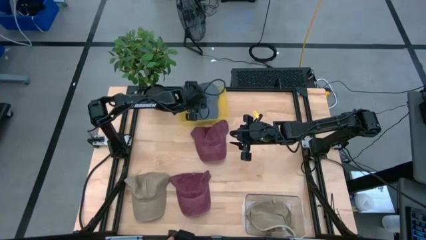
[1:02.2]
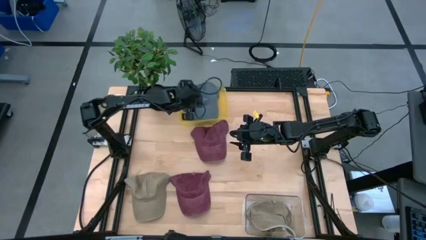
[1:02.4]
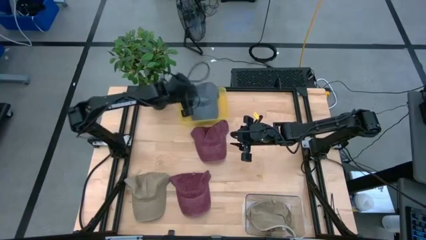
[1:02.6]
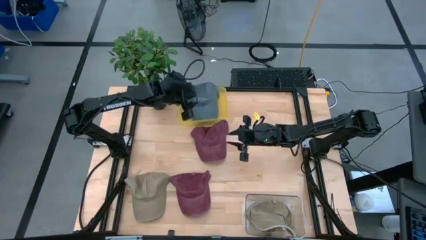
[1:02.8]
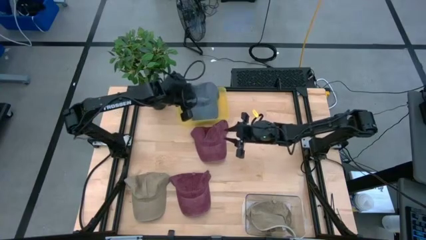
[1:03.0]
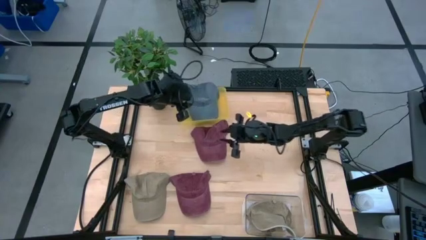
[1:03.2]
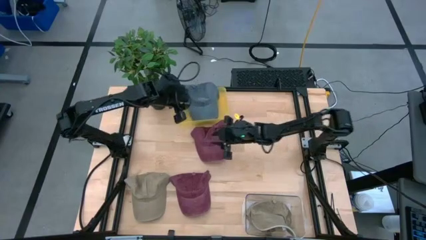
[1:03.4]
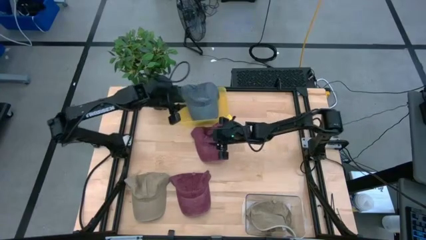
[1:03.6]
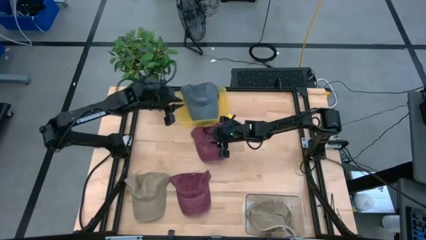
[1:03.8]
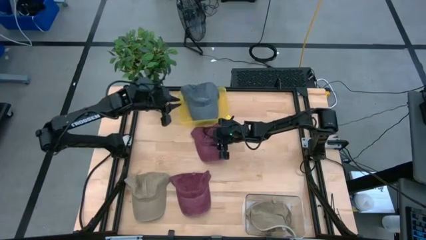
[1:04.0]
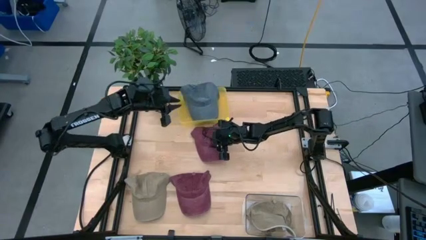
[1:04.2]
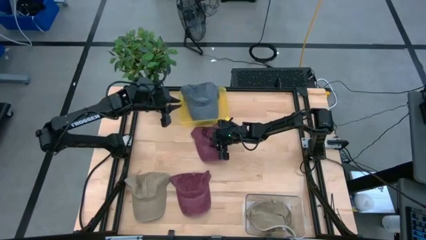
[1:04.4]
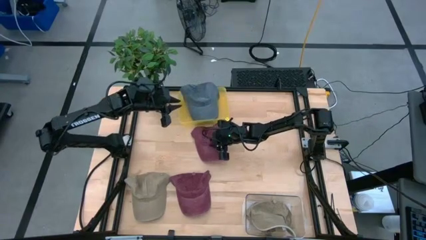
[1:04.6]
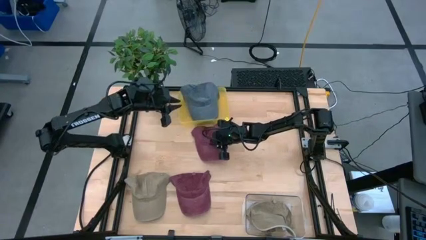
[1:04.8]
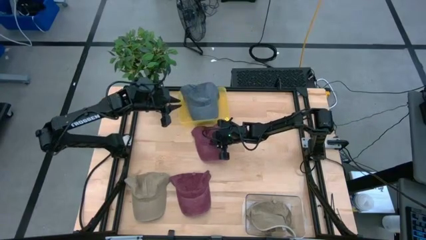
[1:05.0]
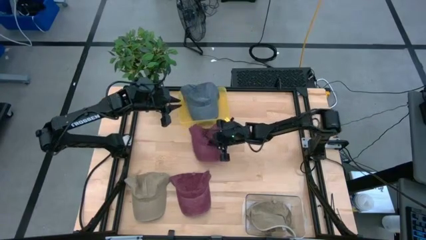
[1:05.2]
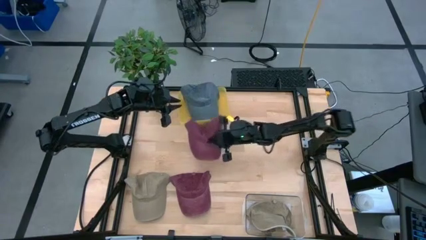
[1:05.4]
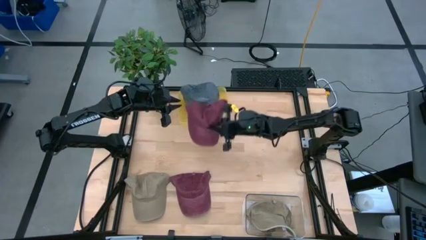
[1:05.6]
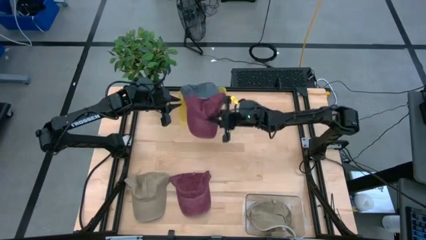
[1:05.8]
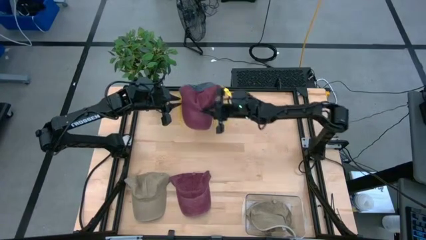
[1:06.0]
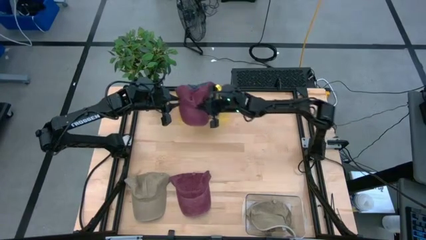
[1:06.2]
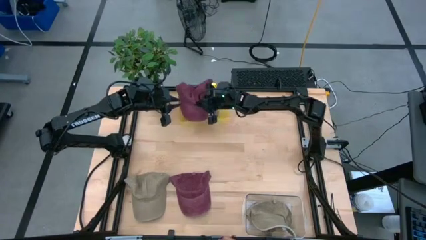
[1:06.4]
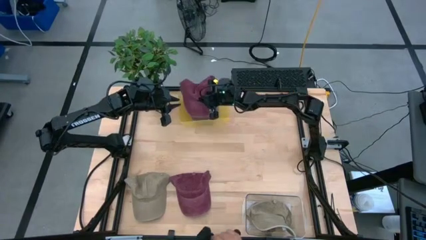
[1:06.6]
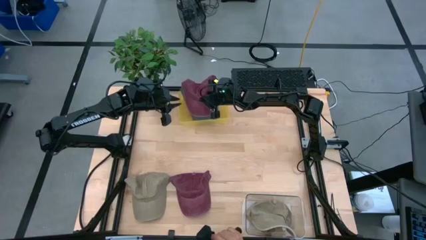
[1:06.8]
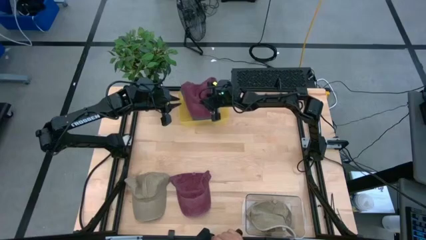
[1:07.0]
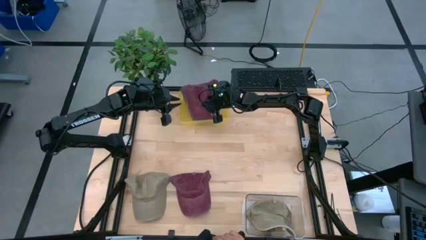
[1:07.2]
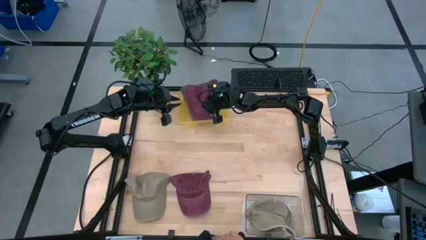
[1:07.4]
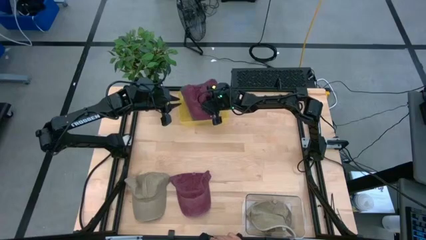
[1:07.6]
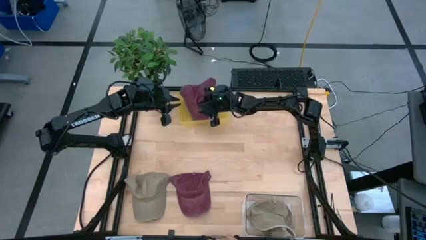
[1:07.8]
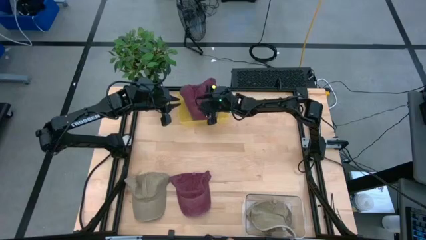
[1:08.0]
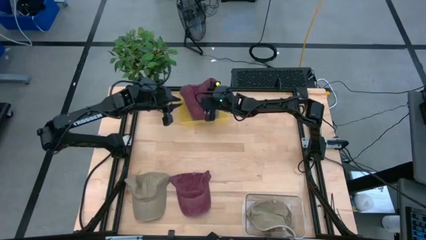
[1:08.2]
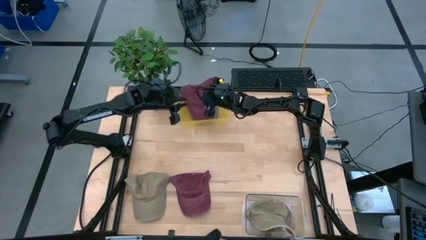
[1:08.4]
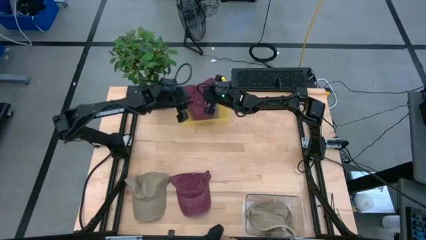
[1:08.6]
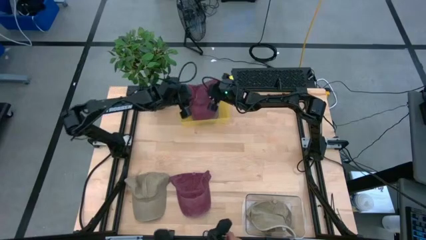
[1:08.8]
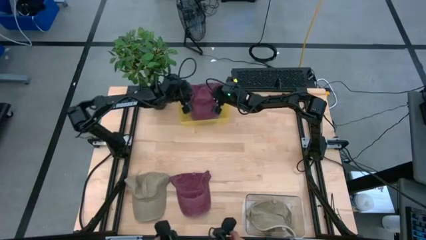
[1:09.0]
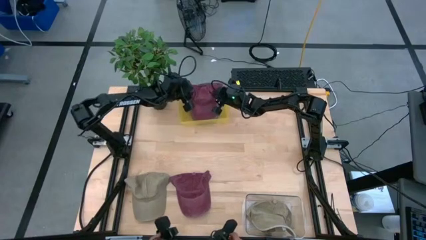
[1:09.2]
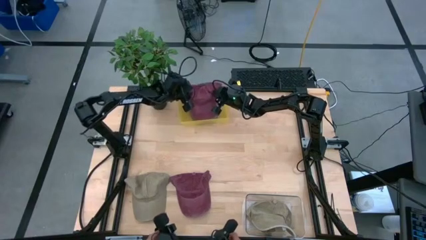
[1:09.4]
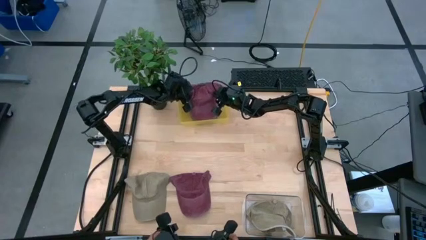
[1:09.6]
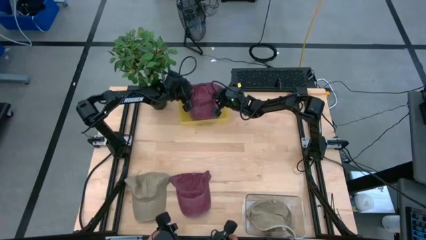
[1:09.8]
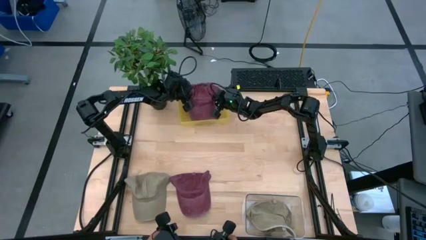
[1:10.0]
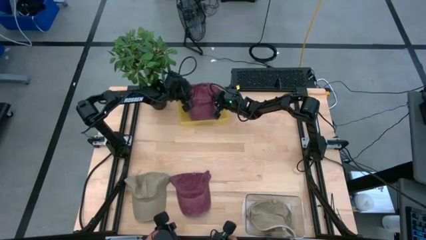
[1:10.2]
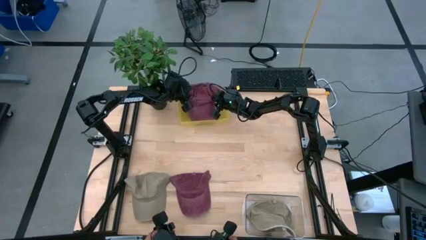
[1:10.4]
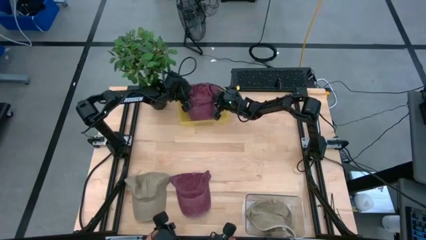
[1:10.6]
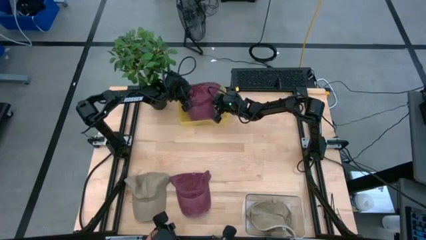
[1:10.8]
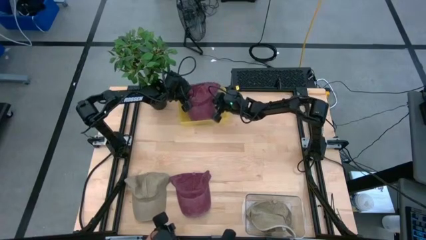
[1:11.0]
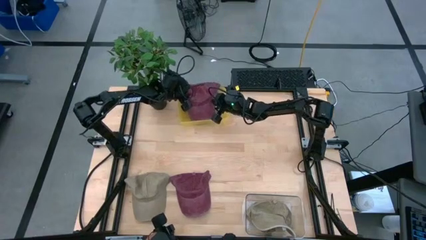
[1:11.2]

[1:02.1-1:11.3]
Task: Pick & Place hat
Put the top red cap into the yellow bin

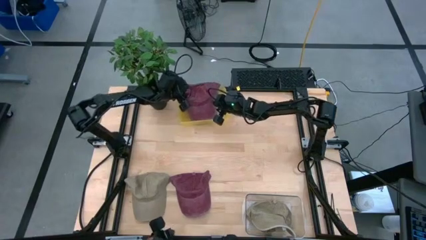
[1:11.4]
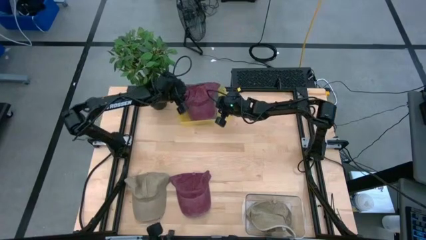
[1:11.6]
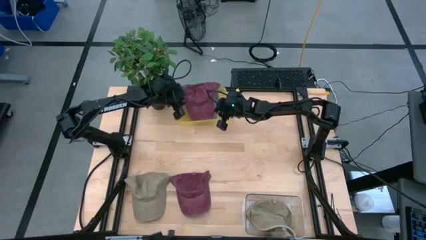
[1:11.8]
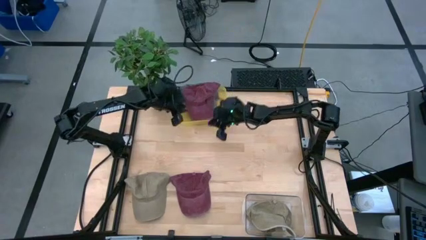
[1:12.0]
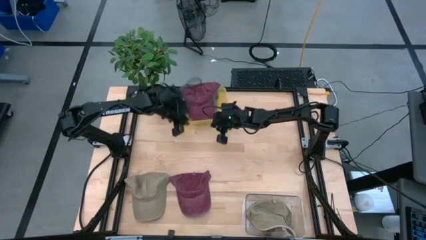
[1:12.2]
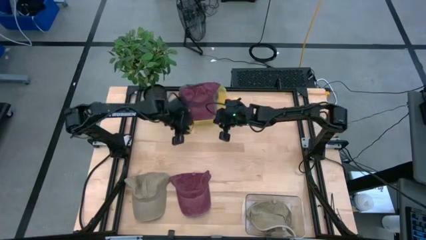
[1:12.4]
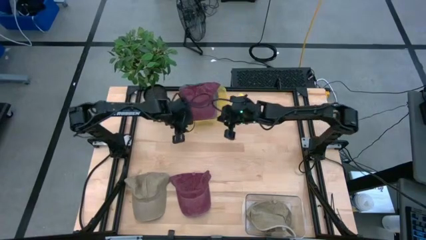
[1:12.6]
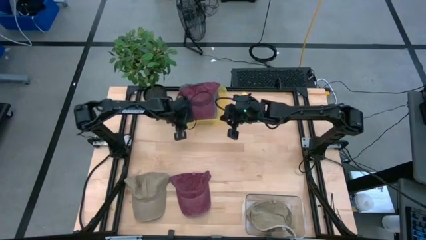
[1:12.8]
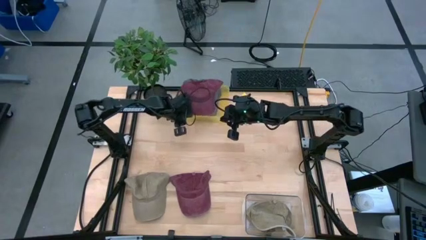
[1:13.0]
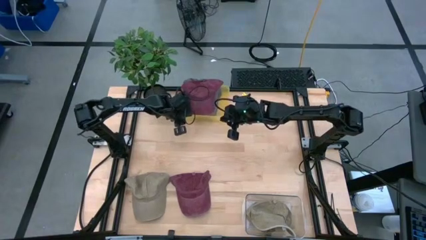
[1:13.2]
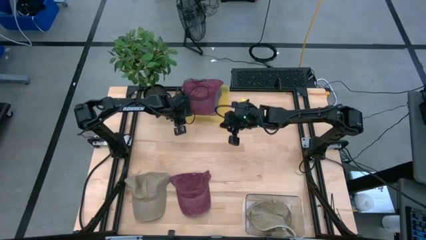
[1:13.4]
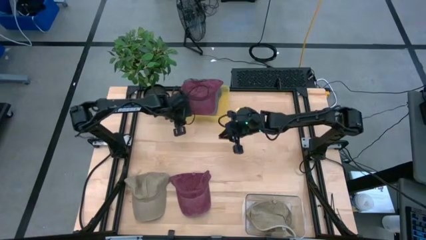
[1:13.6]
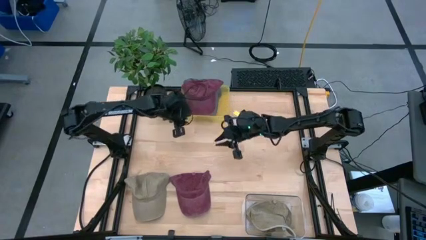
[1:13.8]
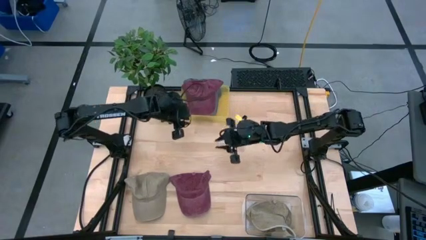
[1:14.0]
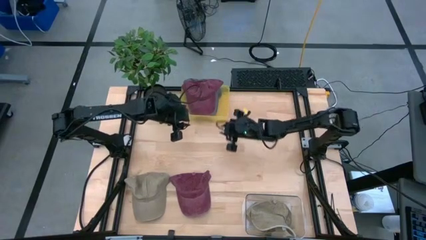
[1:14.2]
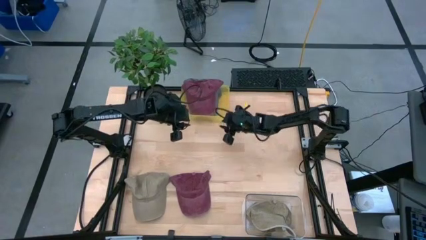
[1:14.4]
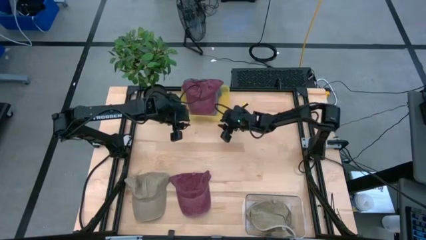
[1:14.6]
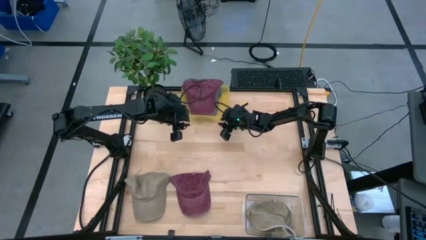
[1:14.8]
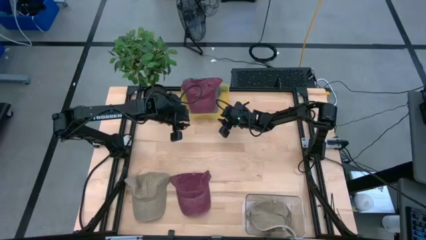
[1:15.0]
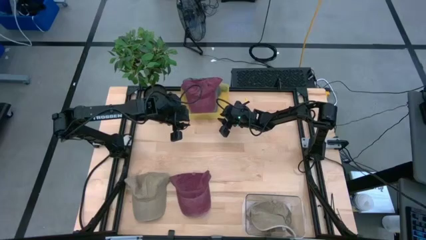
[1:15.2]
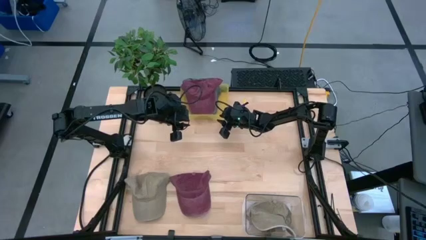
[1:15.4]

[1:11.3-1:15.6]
Adjust the yellow bin on the table
